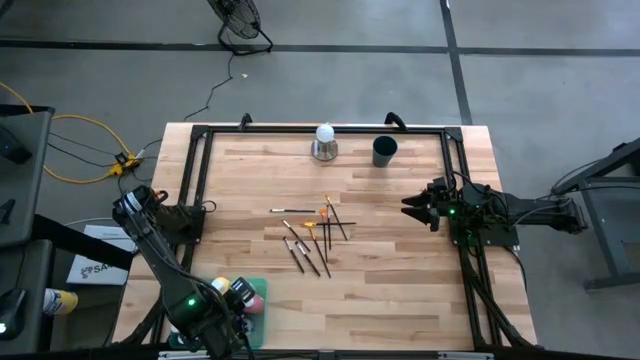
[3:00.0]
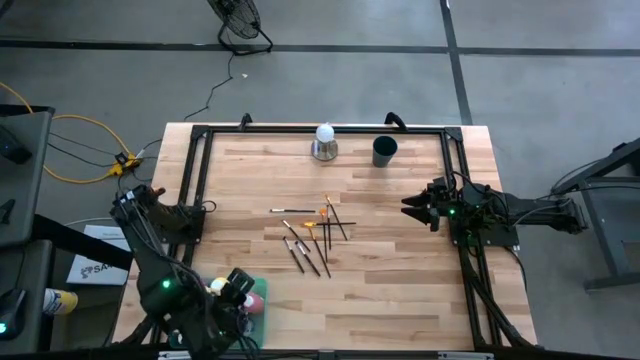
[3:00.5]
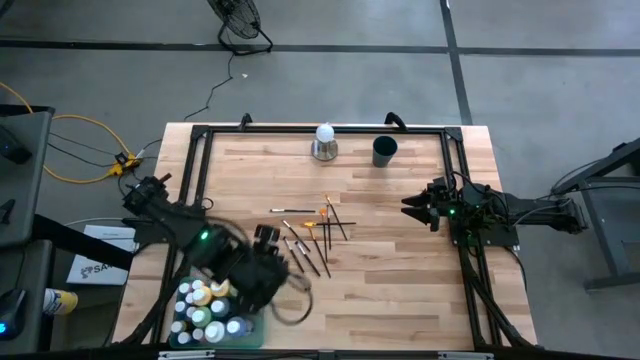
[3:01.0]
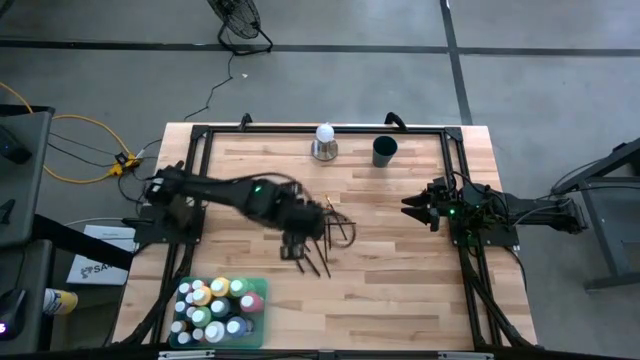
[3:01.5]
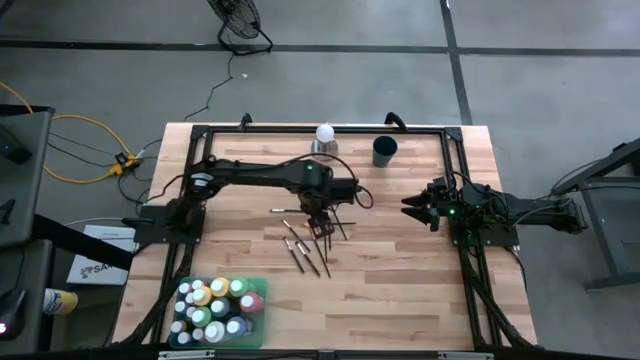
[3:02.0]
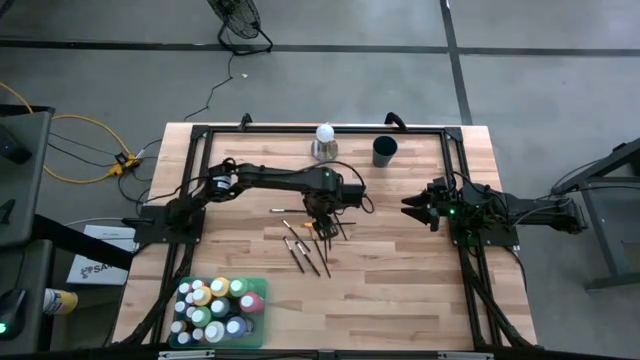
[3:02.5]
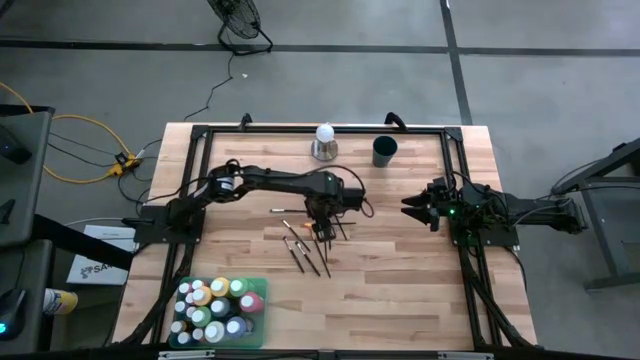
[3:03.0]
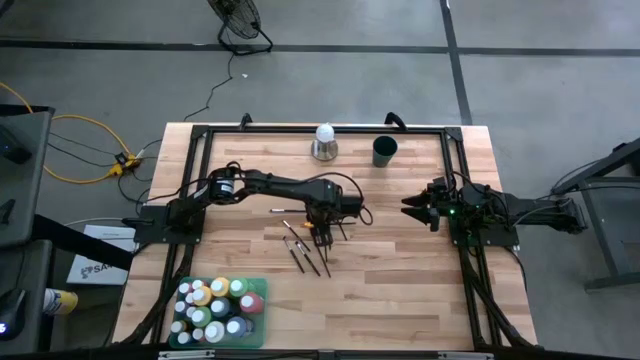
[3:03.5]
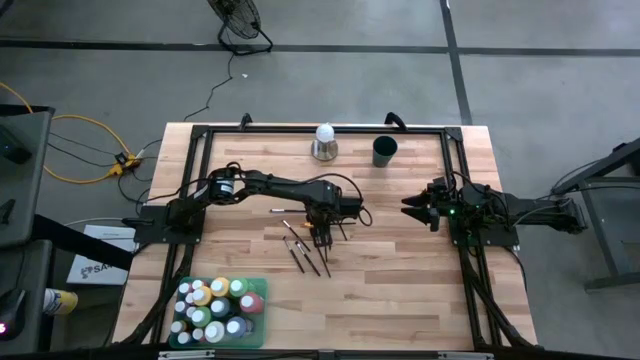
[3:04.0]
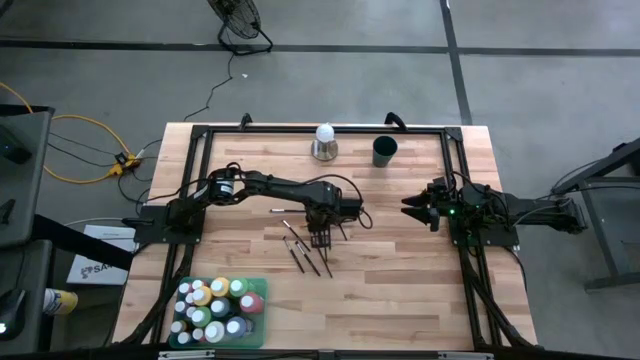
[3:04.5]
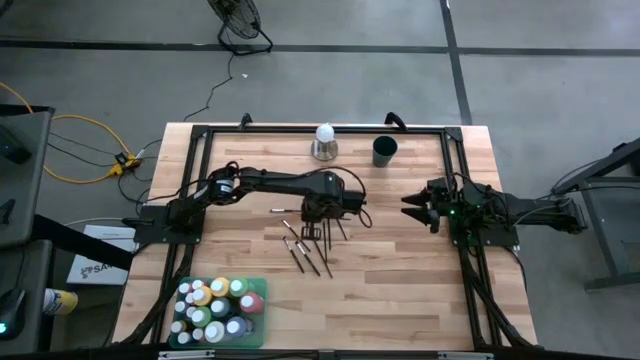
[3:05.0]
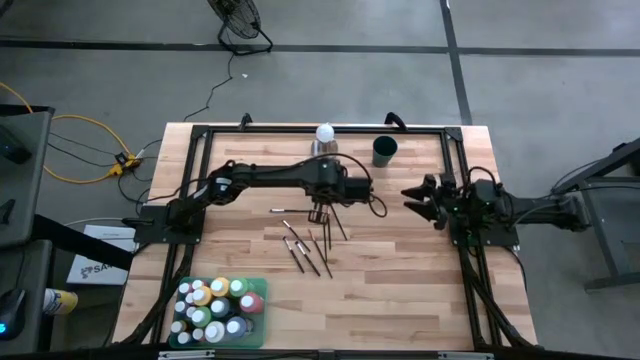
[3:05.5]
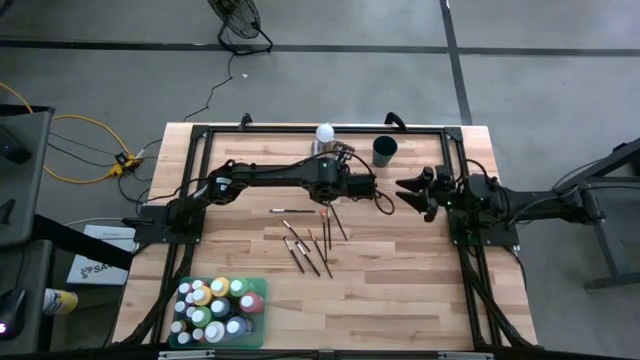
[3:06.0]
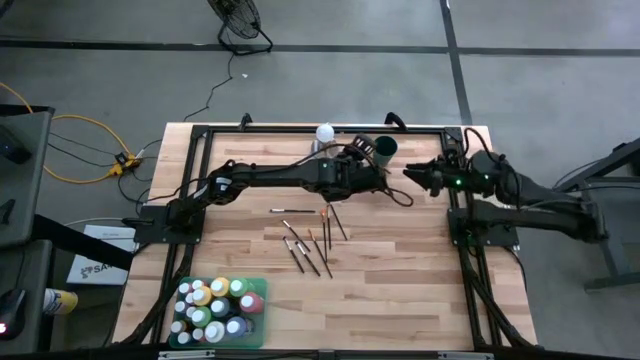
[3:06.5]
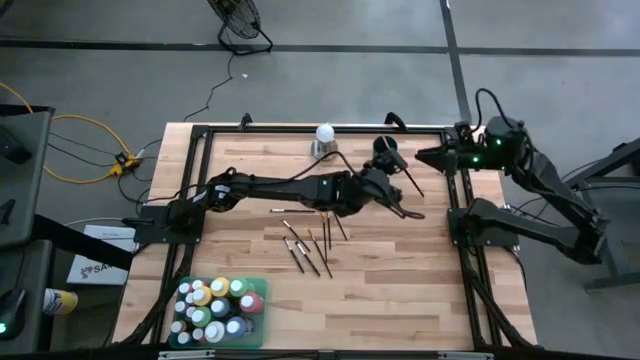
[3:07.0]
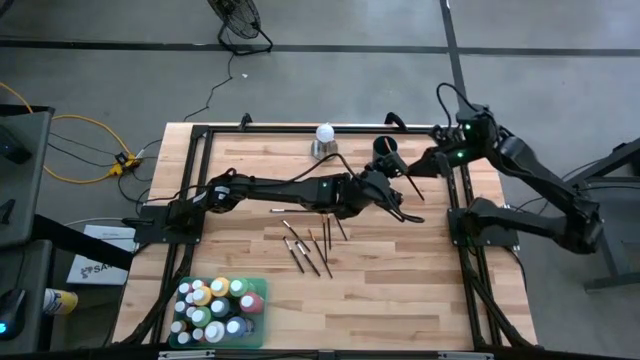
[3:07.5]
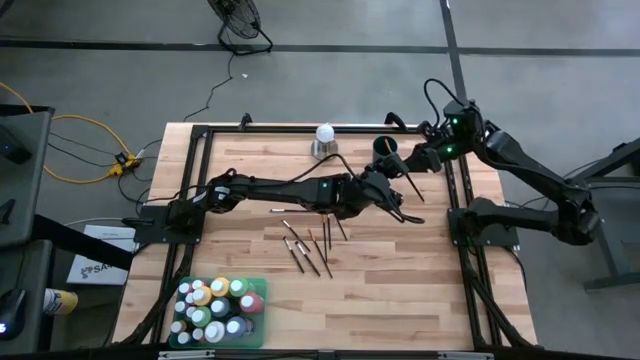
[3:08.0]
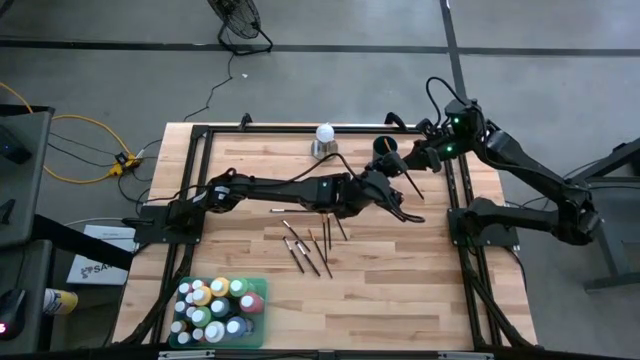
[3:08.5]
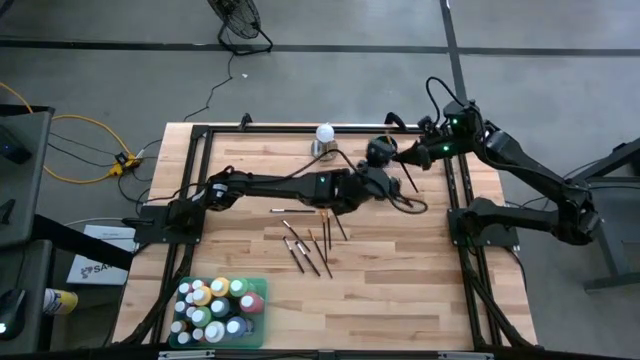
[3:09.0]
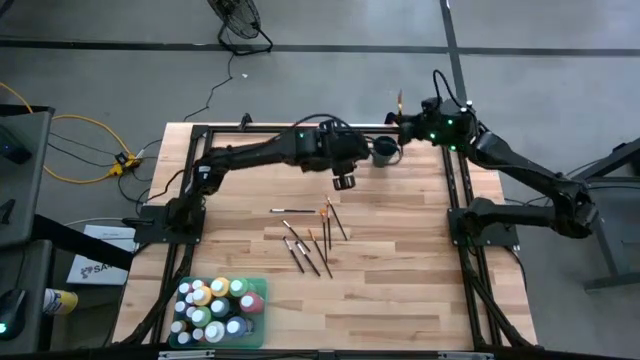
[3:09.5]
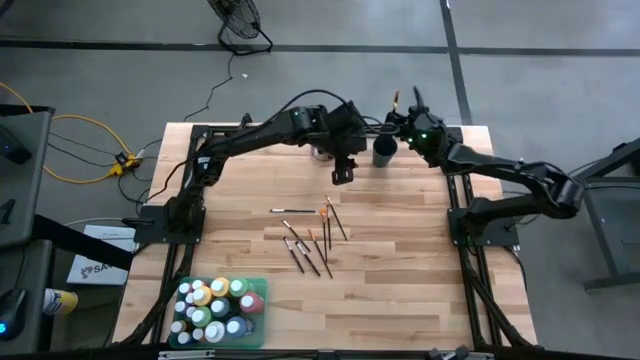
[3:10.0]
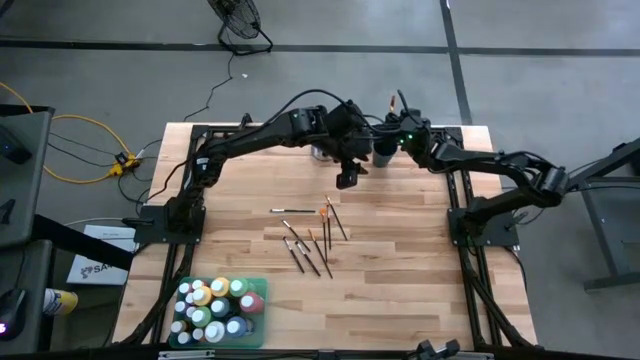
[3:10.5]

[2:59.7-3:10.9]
Task: Pick & Place Paint Supplies
Put the gold paint brush into the black cup

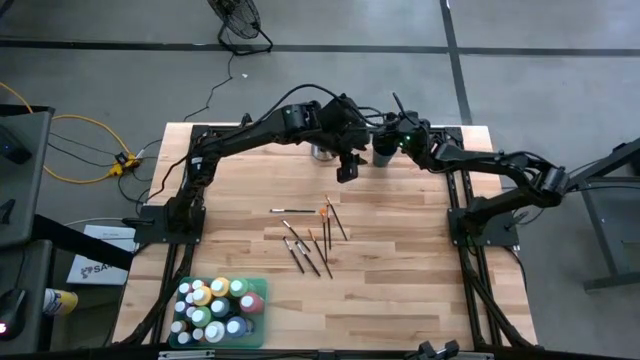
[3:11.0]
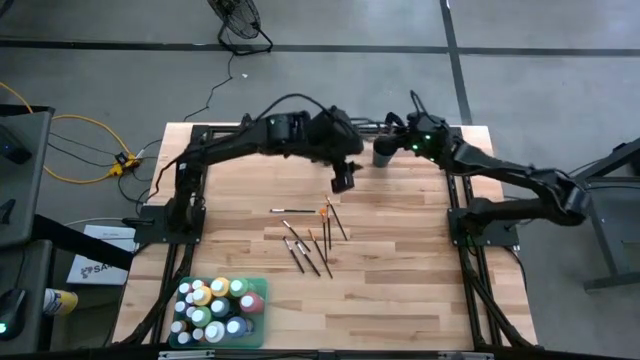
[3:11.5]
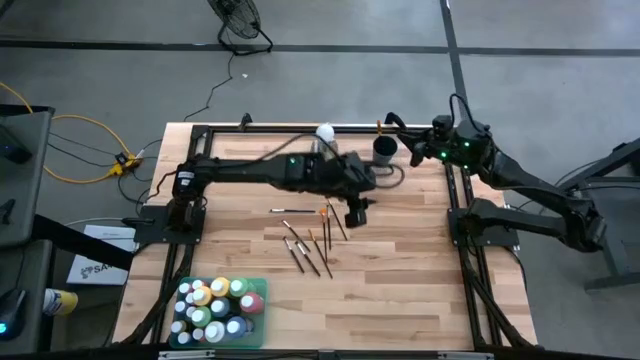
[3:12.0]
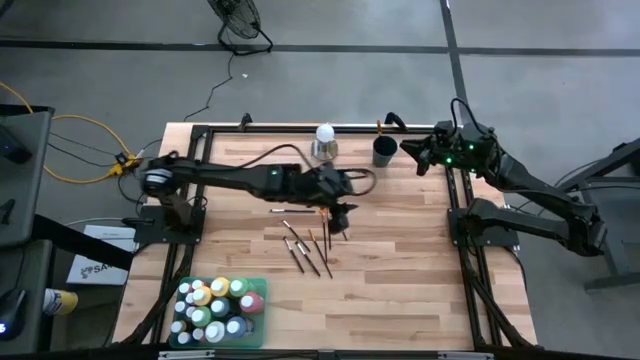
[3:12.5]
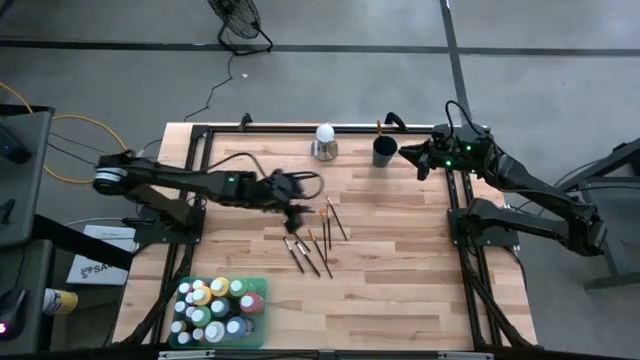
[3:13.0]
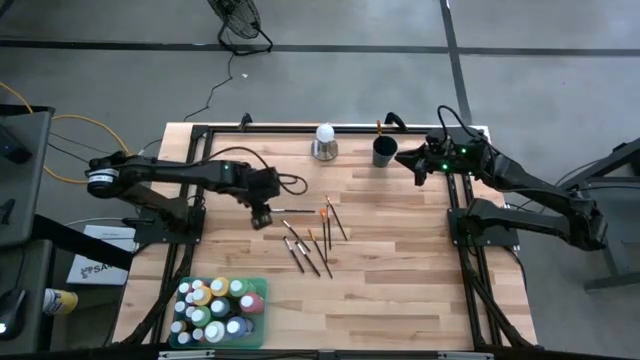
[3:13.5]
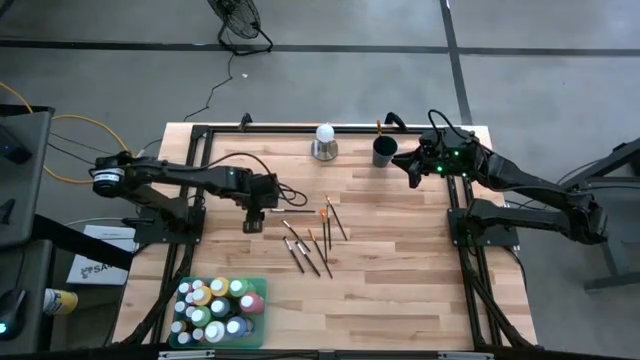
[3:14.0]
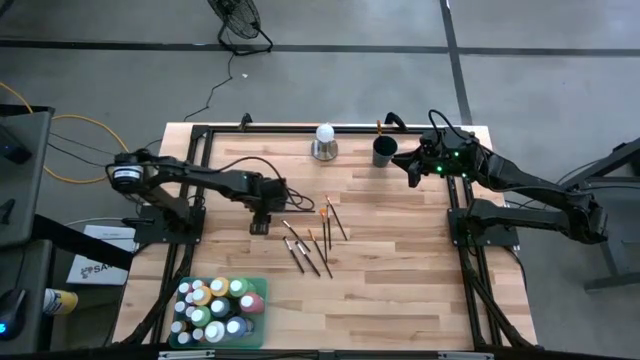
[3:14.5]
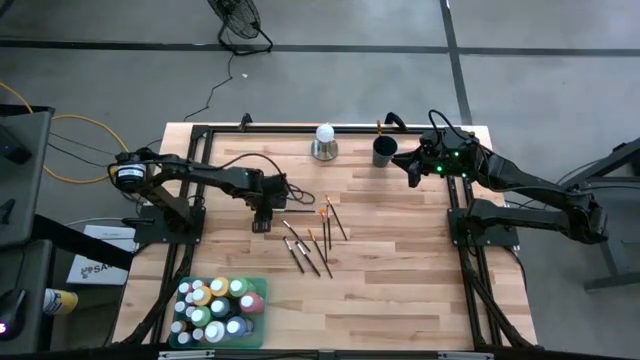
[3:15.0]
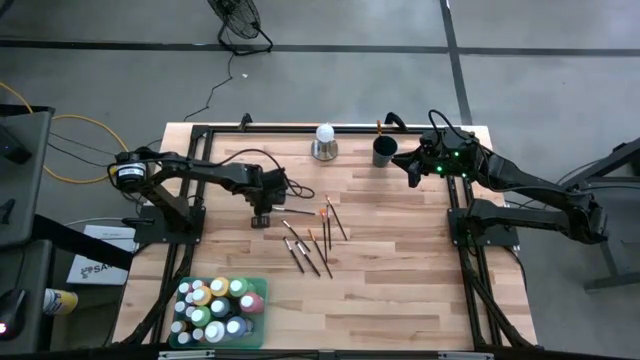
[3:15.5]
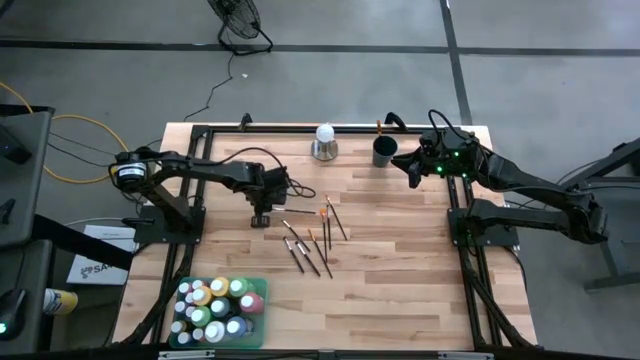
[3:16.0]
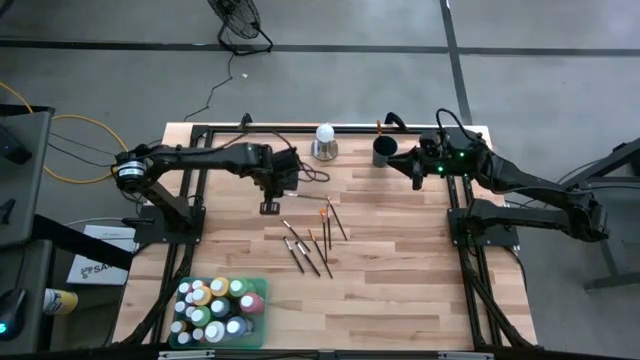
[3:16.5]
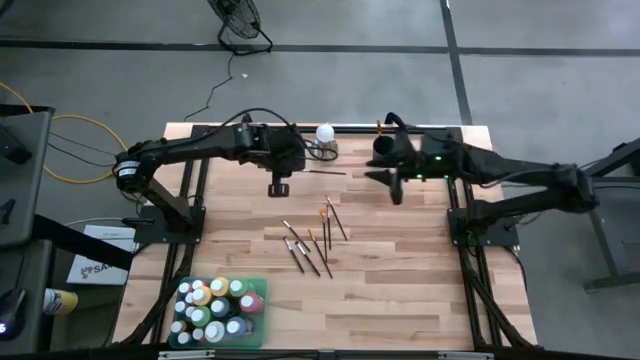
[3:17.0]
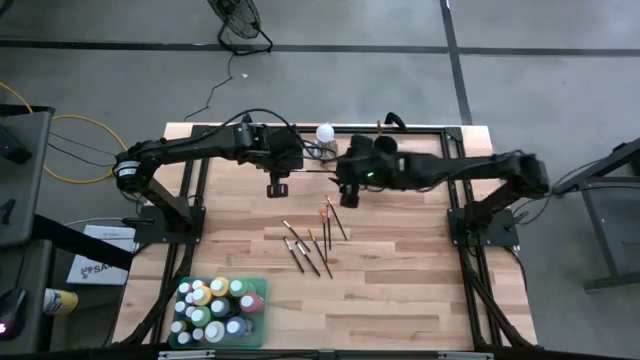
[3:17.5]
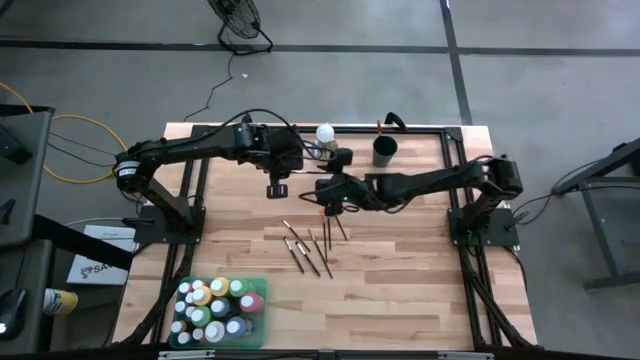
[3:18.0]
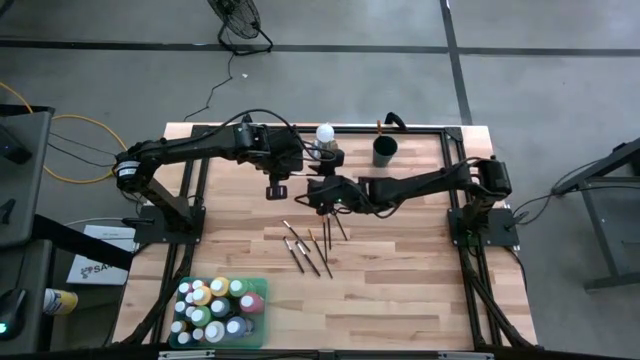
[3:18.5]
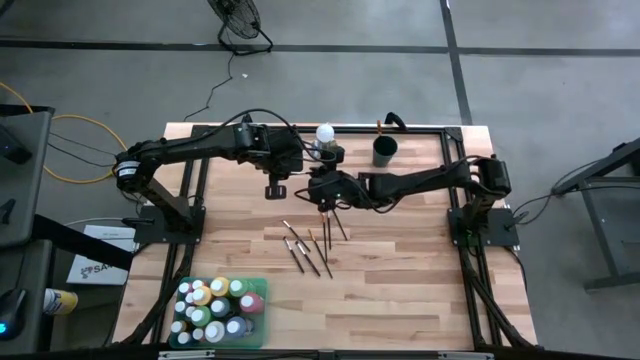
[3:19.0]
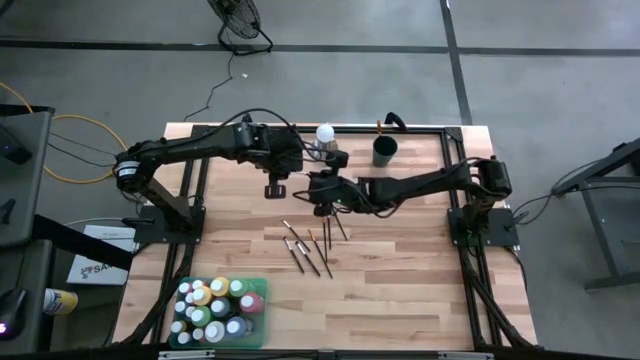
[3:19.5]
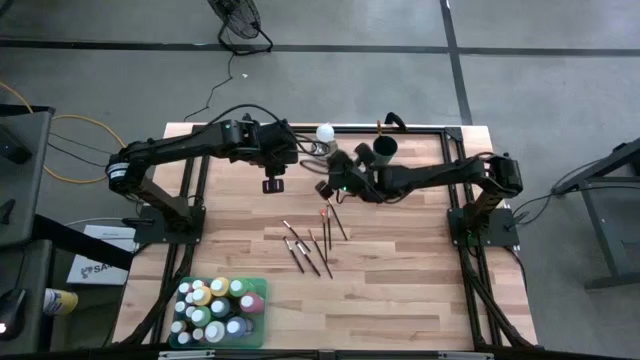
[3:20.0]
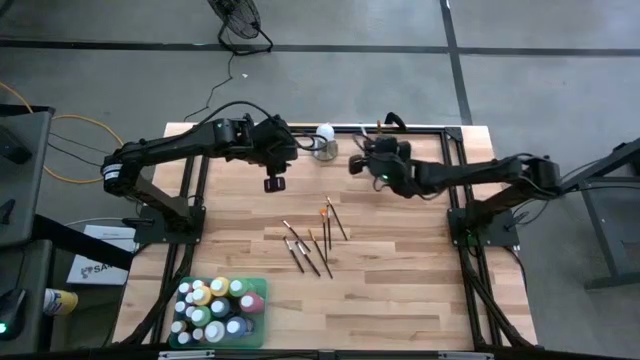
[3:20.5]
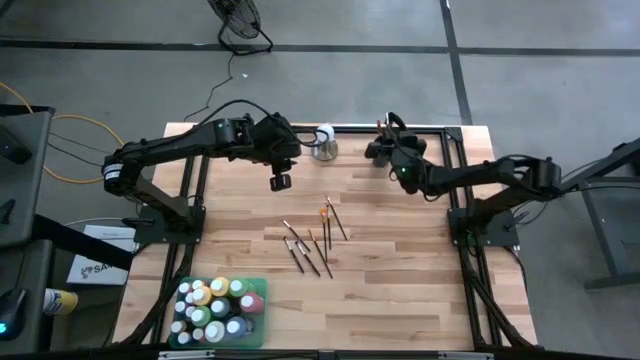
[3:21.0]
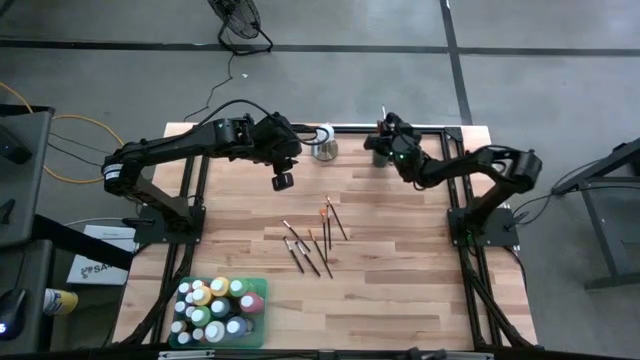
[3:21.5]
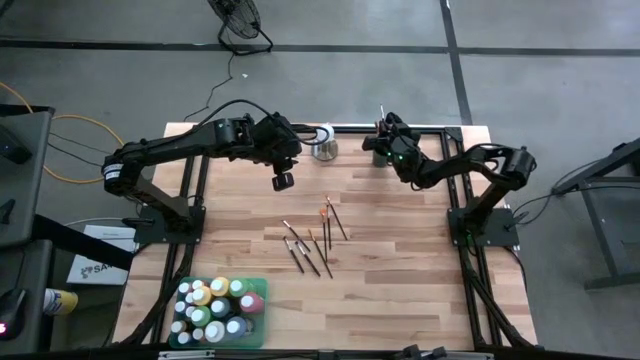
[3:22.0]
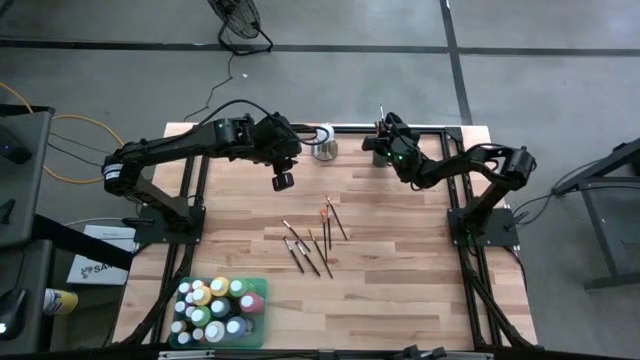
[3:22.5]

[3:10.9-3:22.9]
Put the silver paint brush into the black cup
